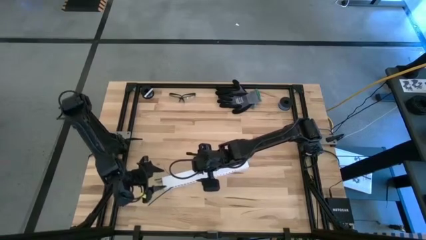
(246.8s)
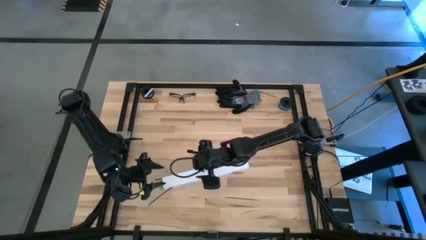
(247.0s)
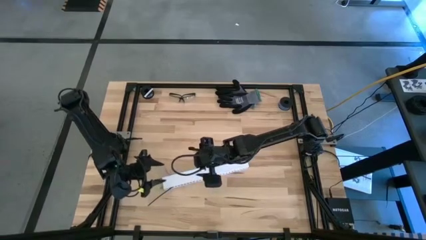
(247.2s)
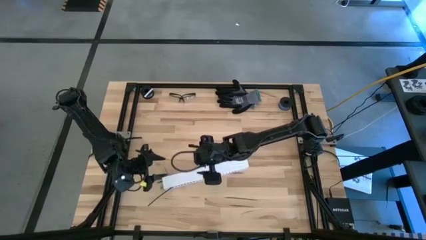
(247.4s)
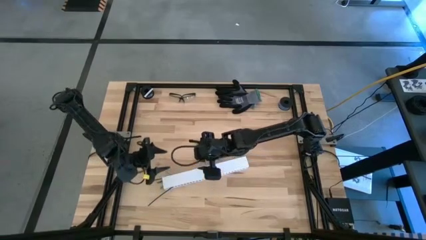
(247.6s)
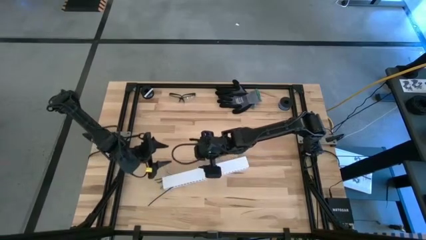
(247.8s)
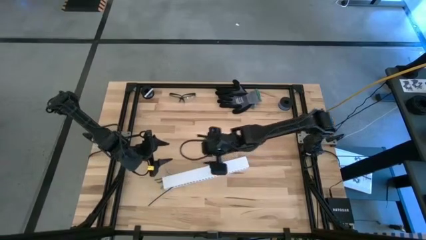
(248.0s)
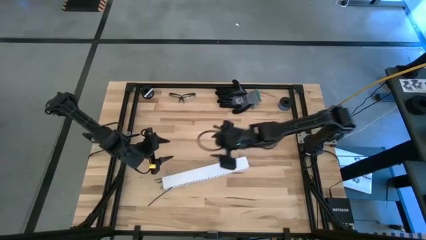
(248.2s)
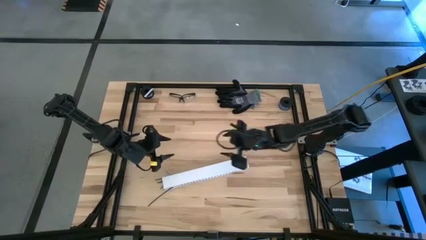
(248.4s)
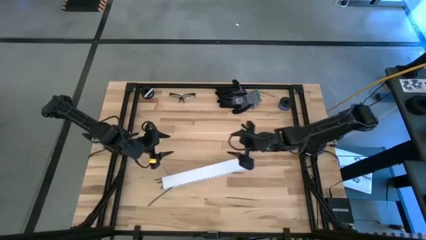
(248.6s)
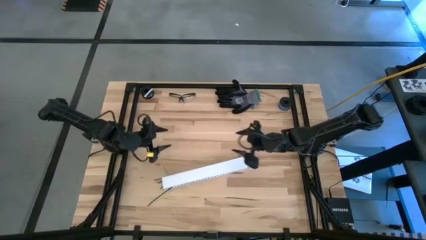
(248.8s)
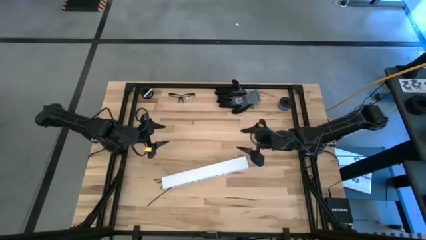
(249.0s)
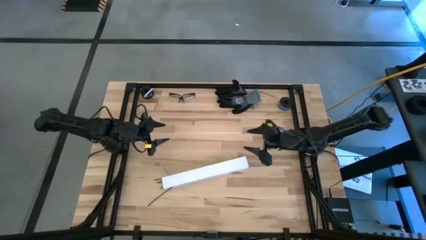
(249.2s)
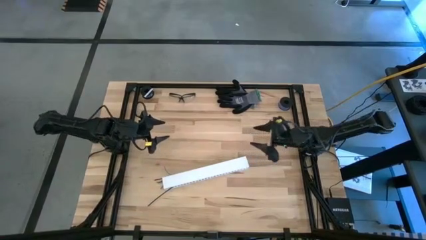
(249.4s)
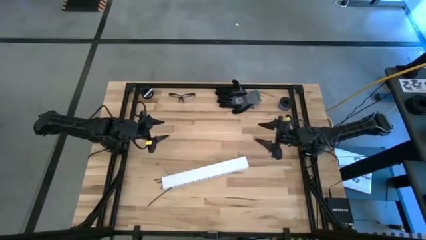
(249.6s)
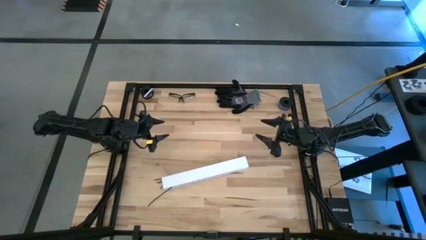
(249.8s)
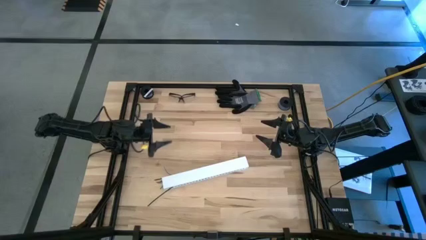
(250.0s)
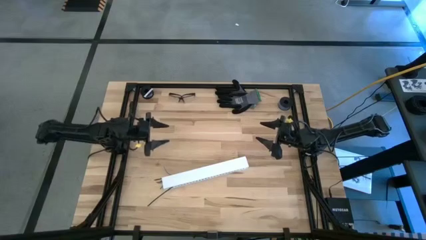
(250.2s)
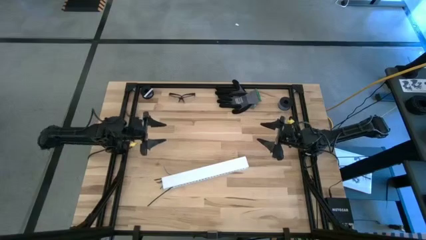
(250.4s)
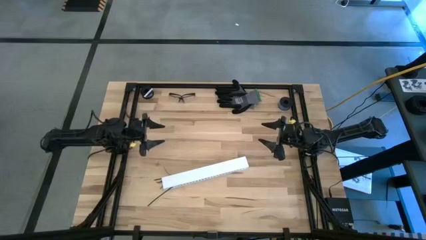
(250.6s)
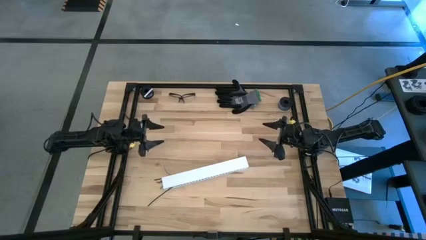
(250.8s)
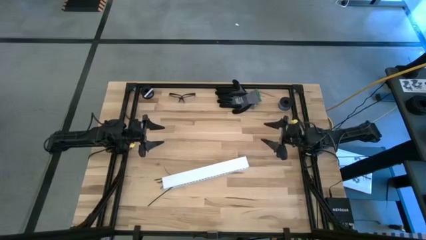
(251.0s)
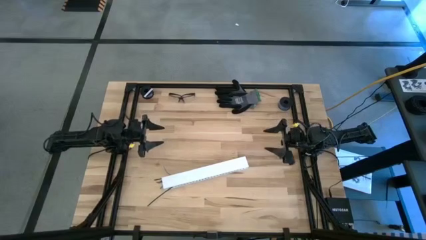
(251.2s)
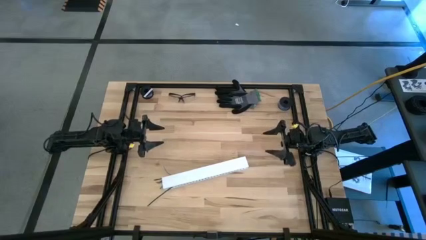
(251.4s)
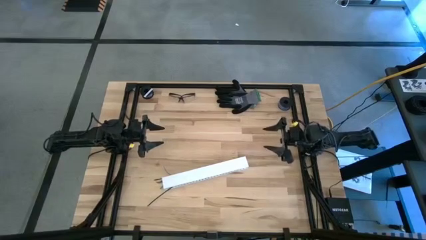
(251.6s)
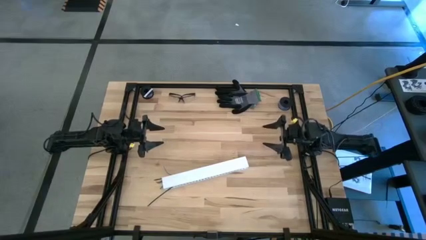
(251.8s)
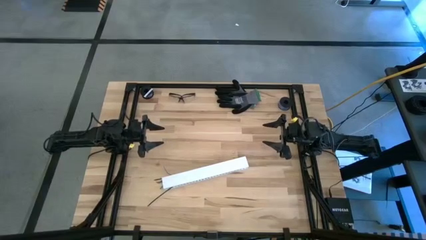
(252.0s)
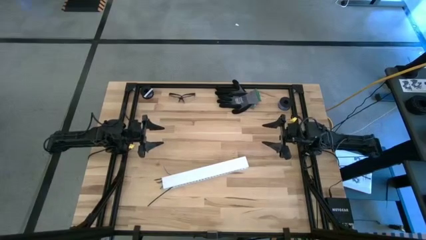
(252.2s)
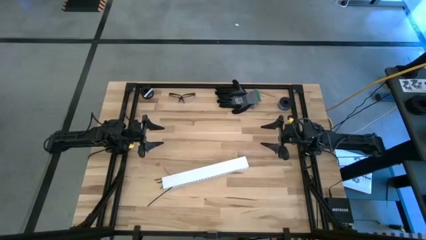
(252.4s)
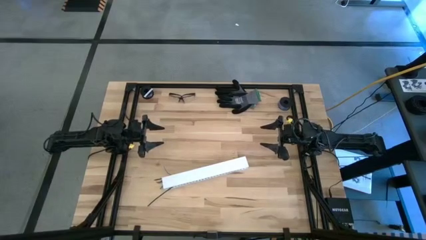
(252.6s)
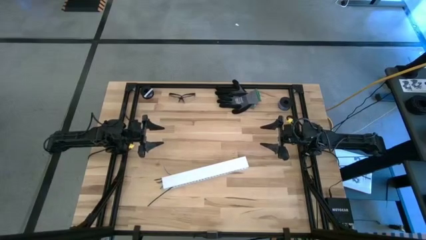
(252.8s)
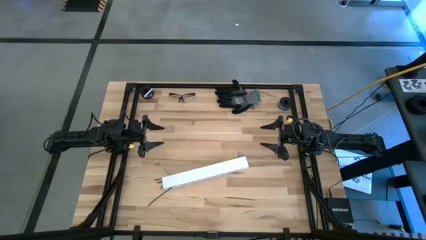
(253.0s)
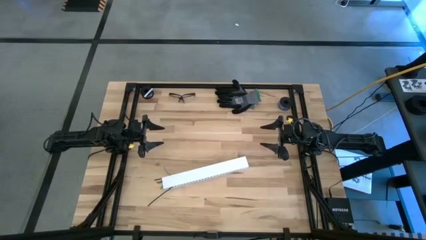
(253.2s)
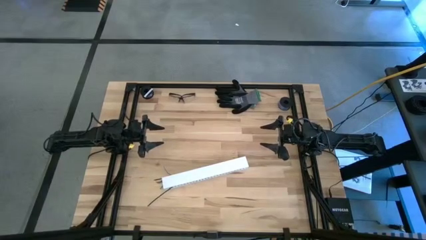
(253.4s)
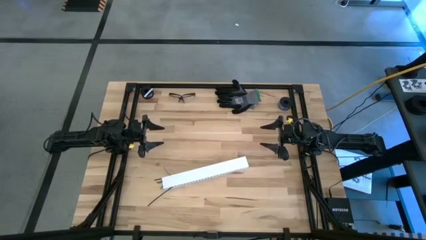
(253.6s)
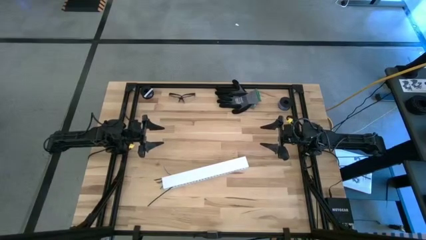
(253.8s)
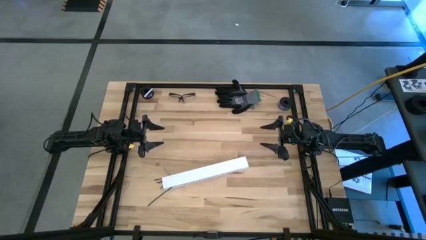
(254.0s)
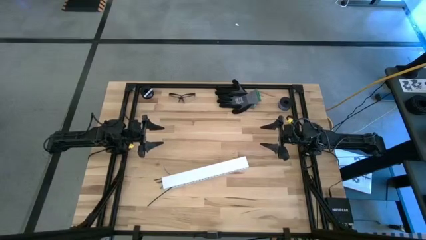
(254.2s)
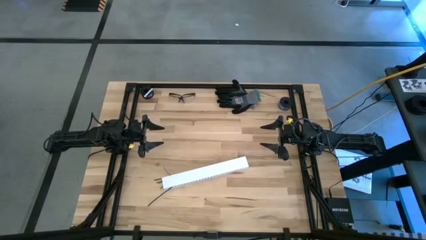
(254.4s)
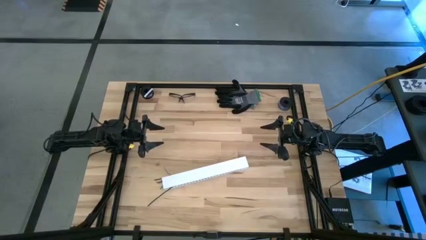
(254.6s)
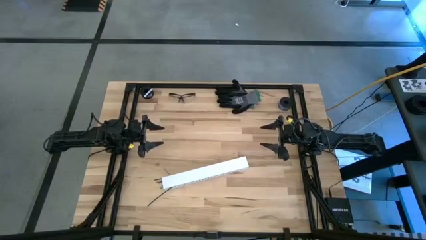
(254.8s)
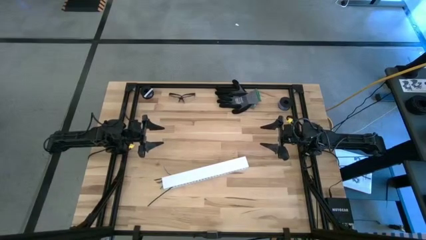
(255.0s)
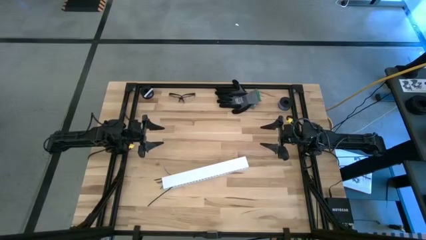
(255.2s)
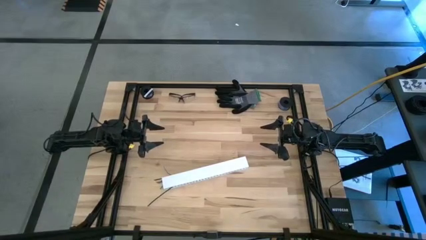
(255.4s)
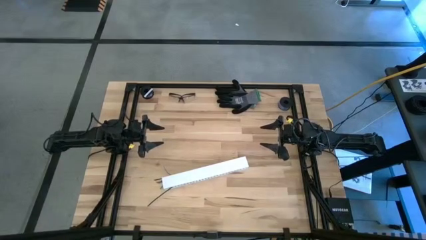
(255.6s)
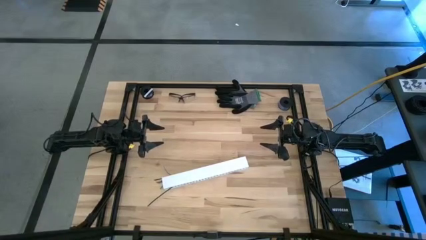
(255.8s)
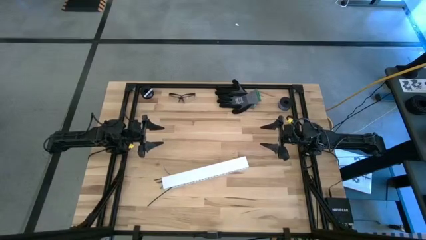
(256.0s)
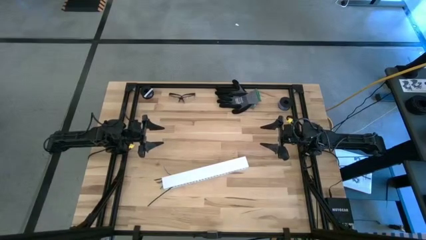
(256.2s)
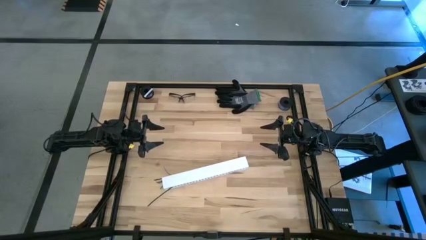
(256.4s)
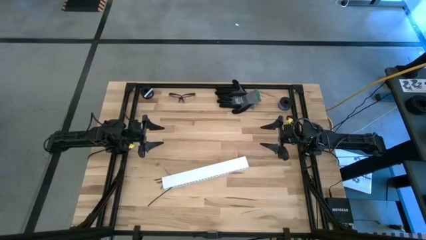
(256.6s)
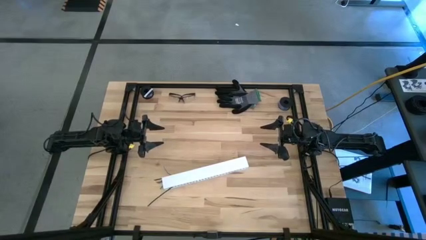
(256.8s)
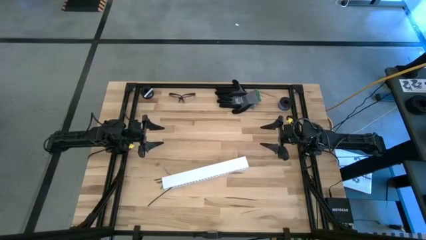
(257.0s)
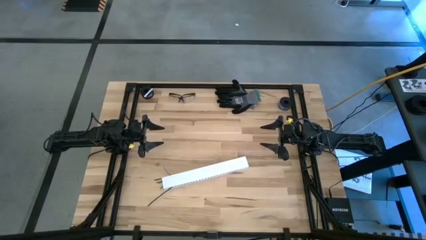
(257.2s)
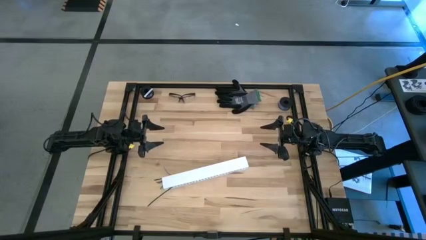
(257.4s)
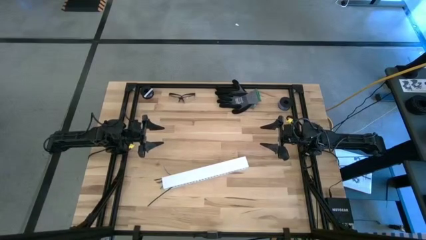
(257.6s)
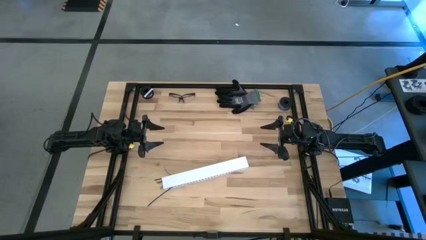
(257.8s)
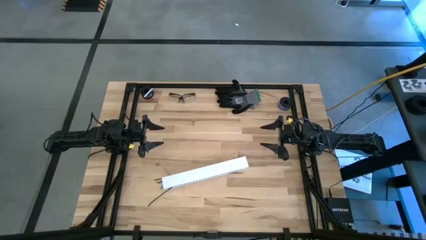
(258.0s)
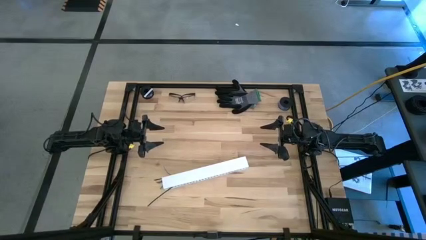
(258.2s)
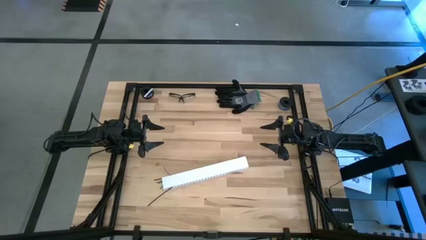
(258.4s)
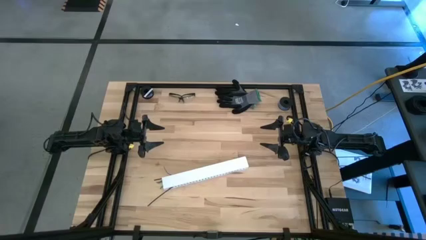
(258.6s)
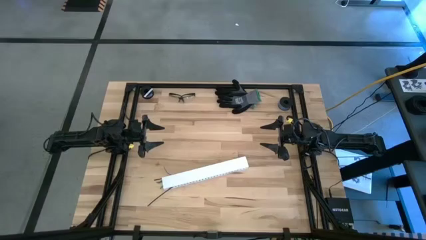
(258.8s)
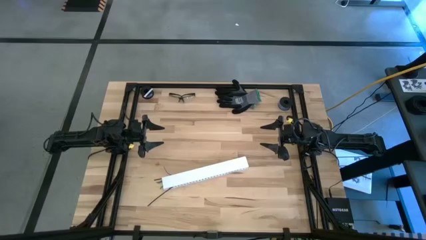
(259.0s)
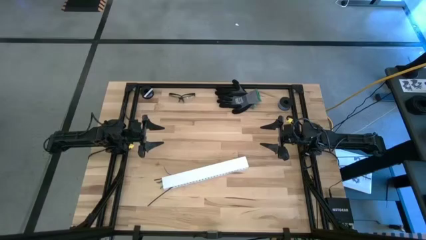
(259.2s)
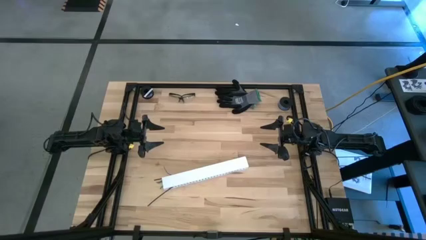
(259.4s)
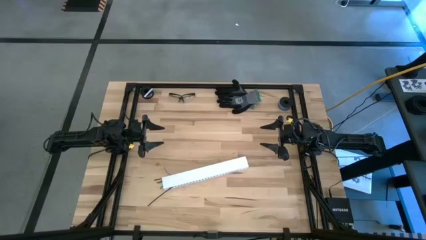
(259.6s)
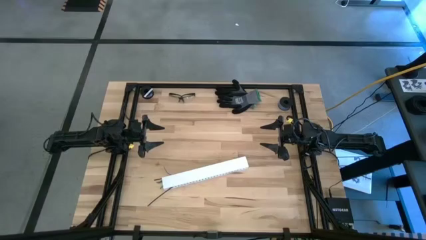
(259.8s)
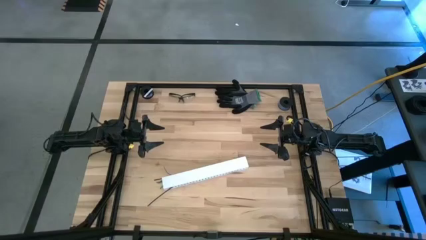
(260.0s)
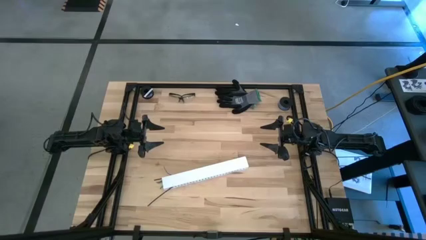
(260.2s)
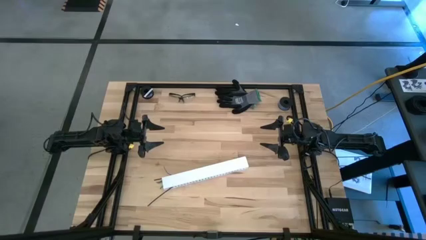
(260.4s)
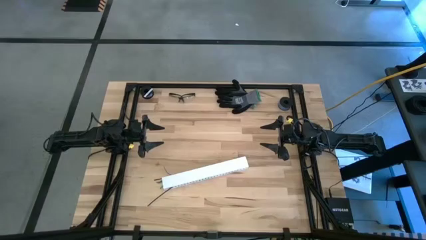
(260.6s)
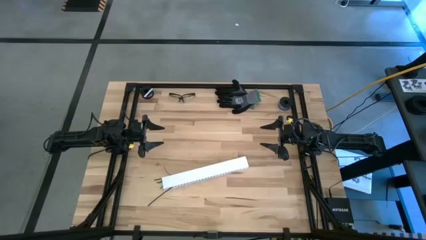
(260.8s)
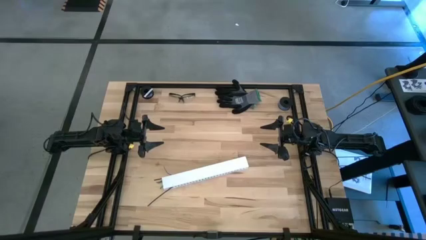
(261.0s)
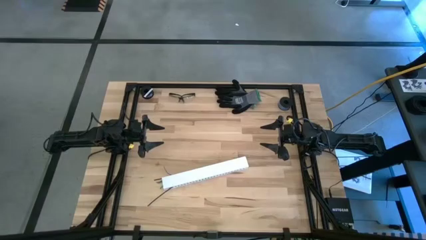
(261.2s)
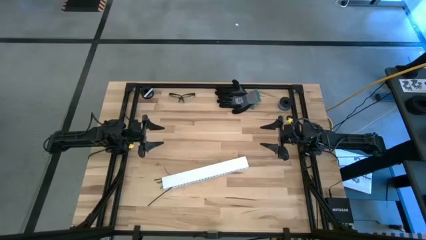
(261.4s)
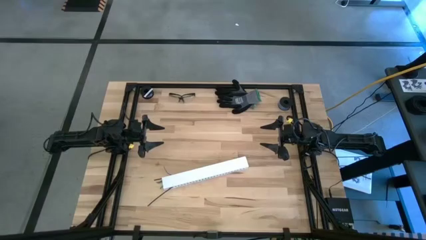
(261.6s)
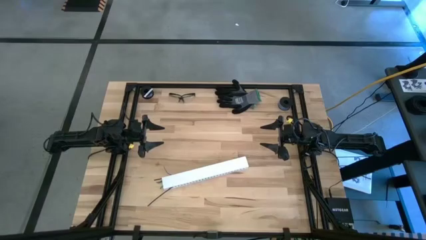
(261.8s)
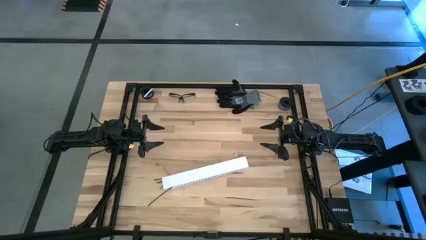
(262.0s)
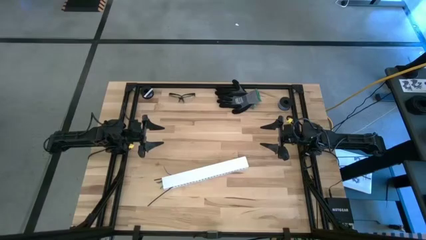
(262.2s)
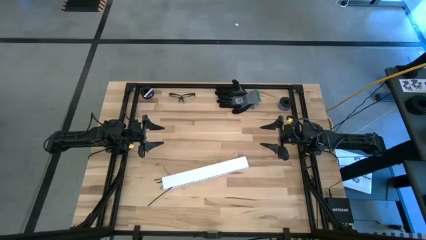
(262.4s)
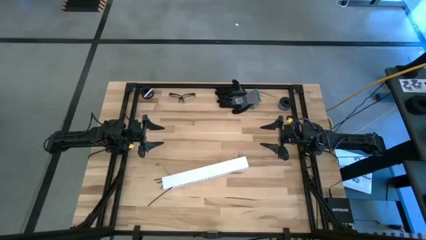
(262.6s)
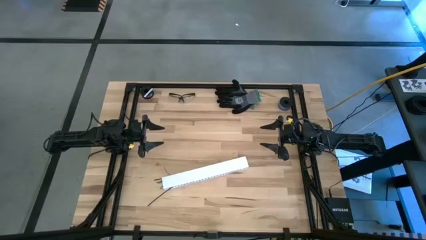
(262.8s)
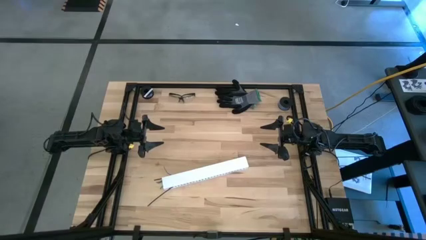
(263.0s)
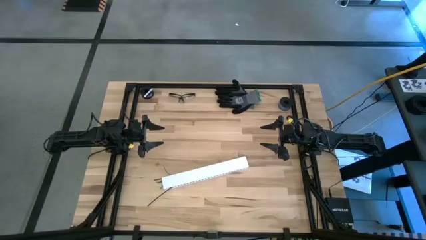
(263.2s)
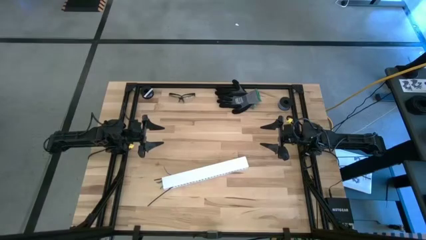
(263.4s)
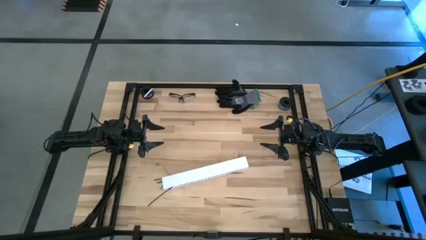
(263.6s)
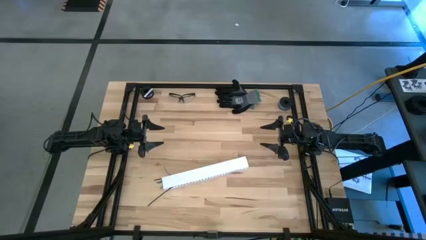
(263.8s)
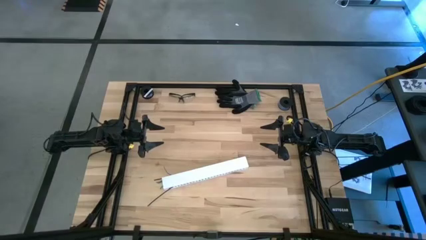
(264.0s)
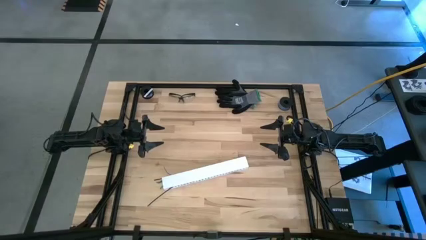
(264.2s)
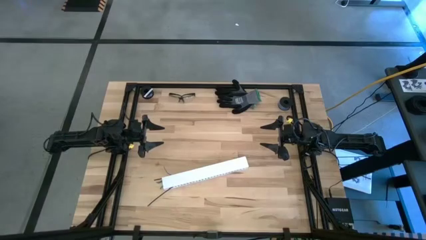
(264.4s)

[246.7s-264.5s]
Task: Ziptie cables
Return to Home Position
